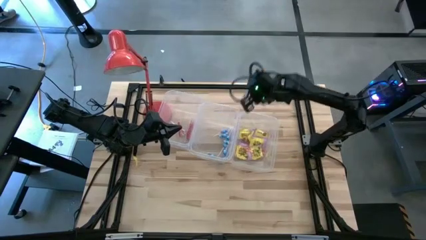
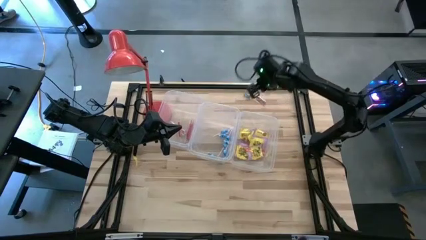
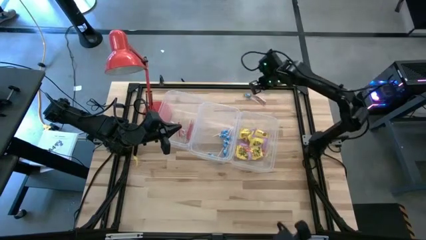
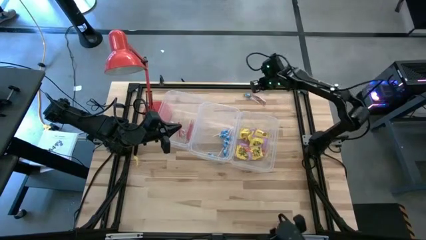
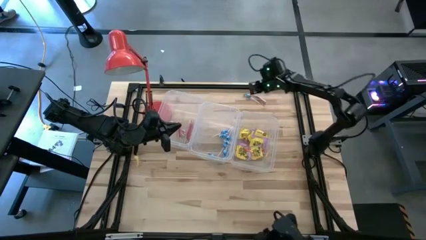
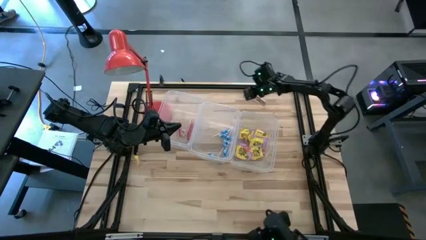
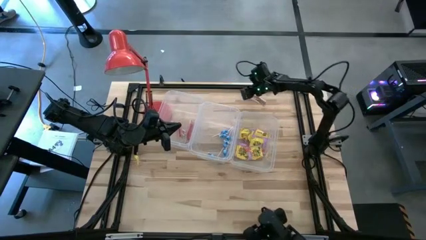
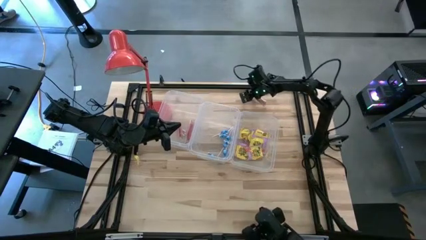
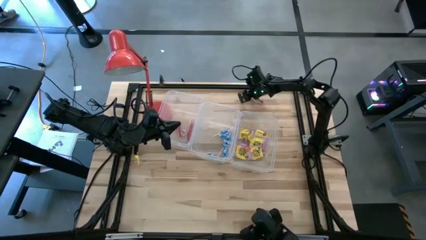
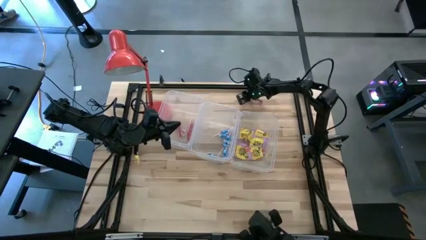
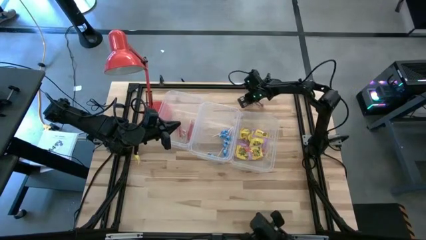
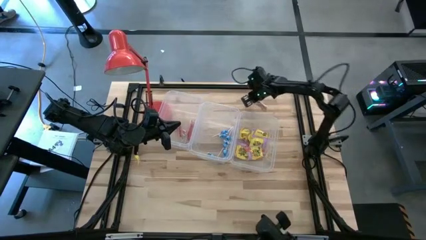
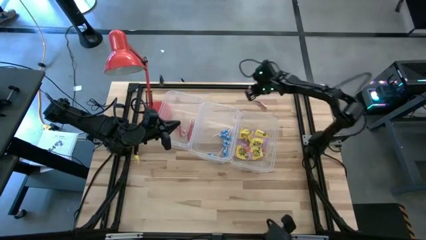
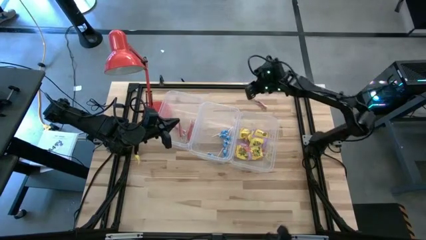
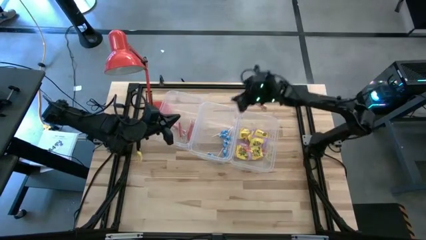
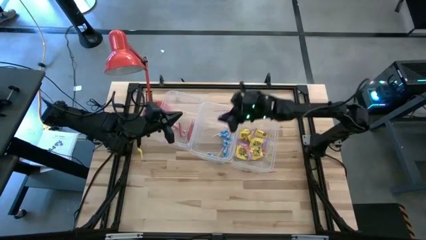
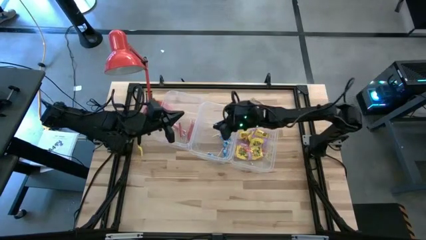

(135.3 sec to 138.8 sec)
Task: Sort candy
Put the blue candy into the center transparent bin

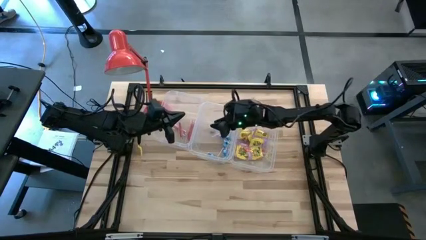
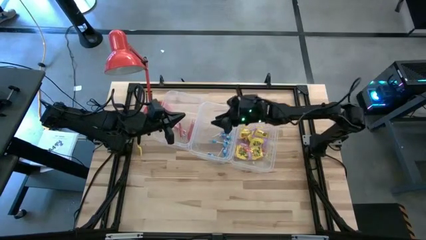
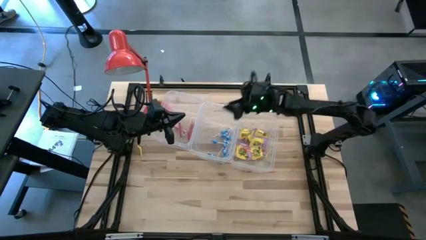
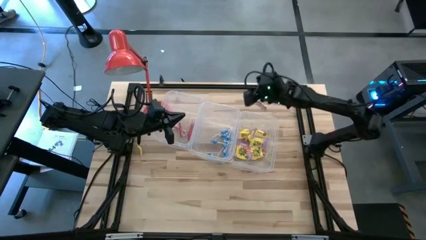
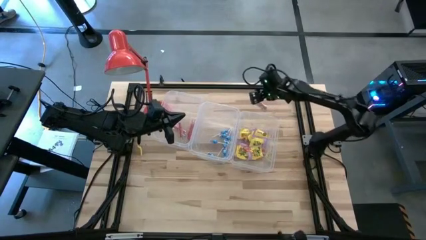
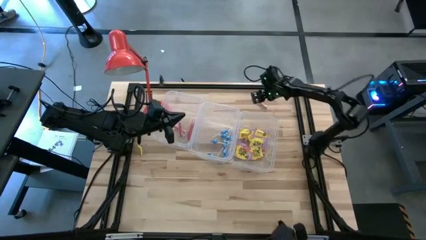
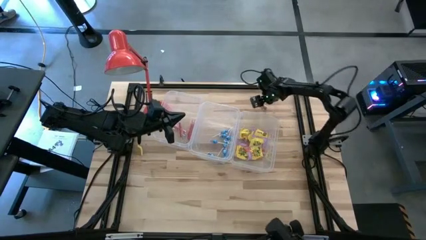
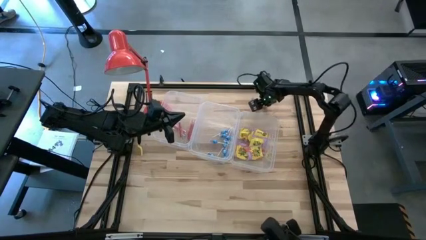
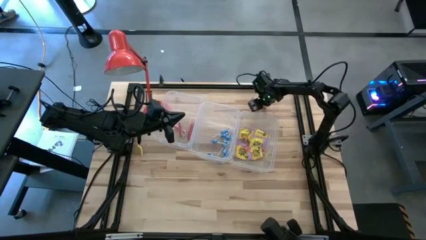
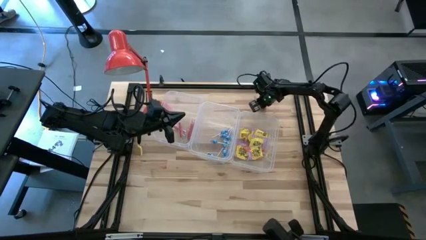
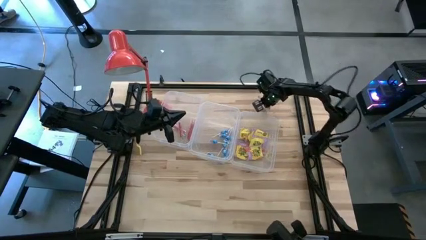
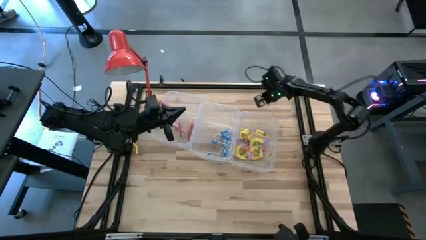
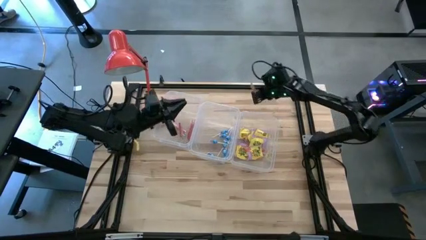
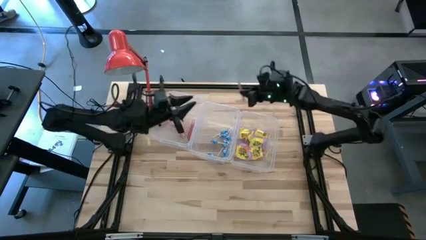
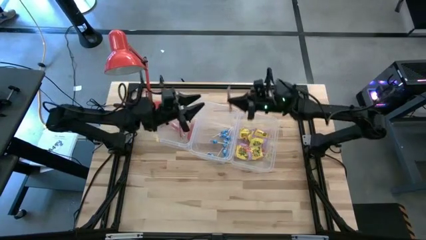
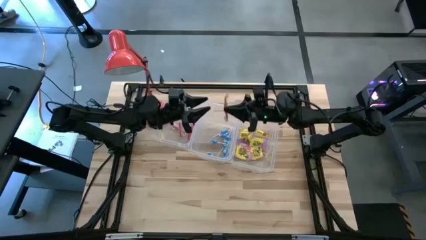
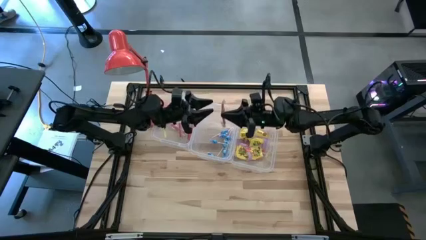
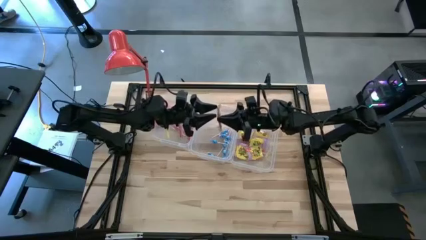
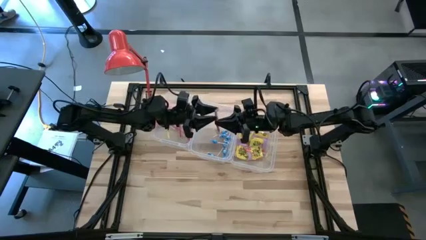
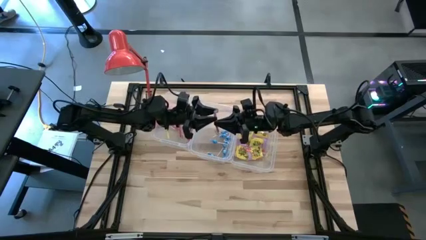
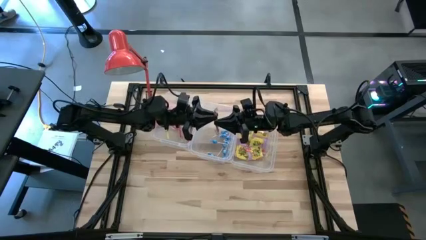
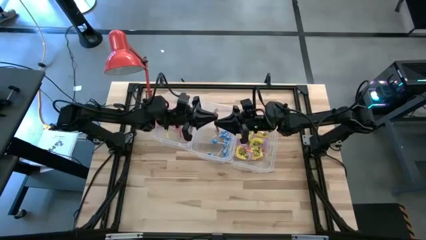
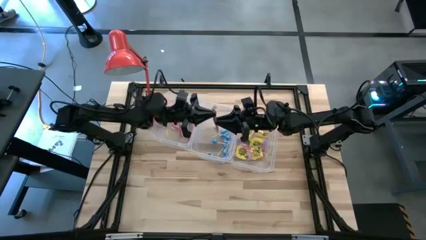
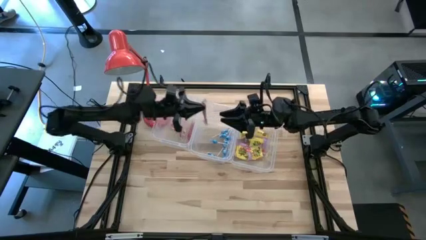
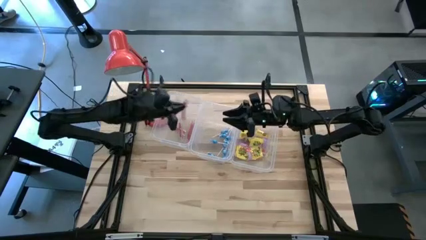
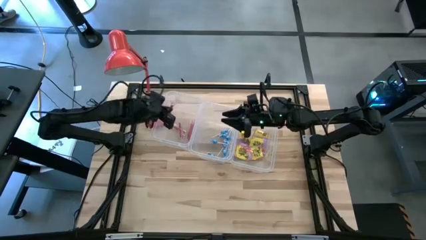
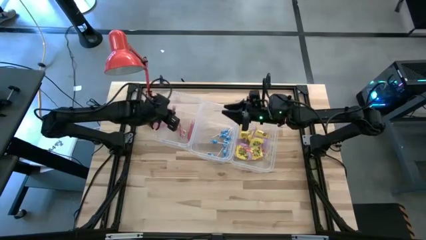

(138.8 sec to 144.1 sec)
Put the red candy into the left transparent bin

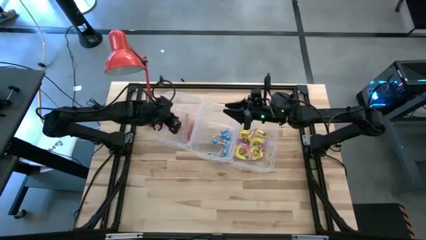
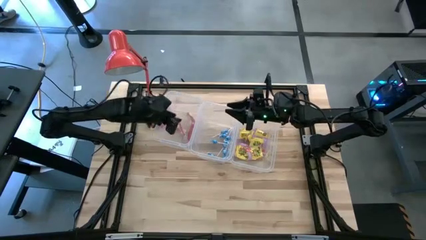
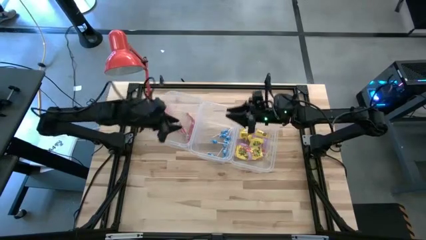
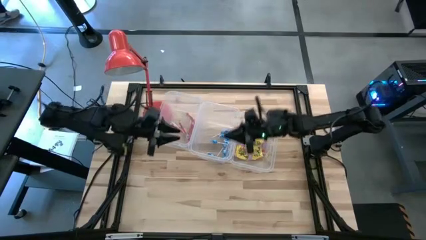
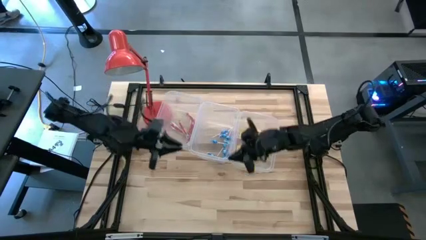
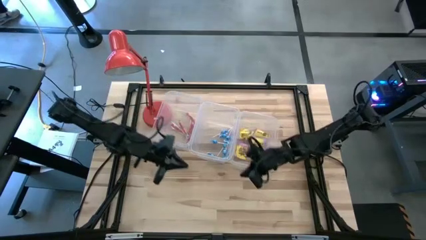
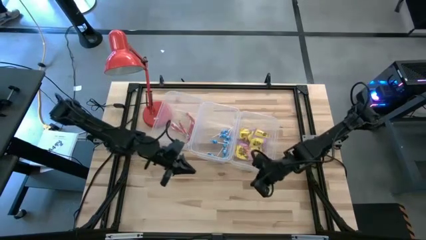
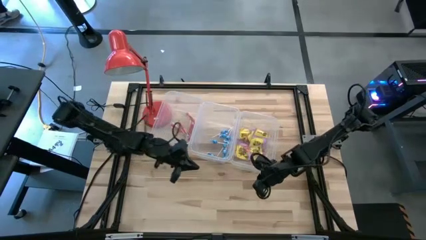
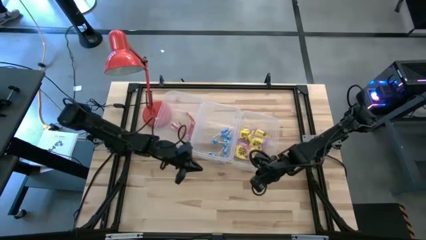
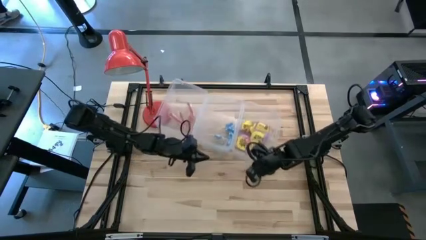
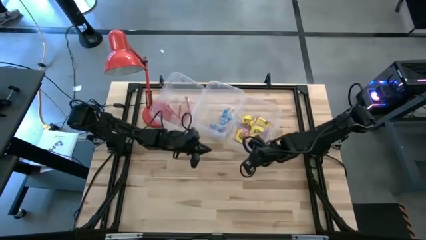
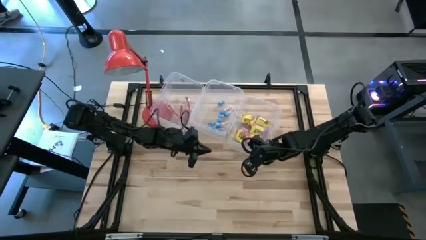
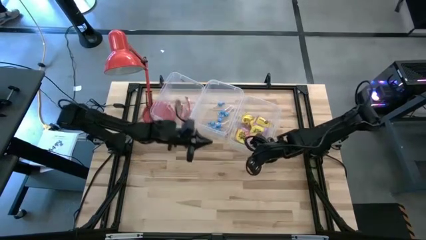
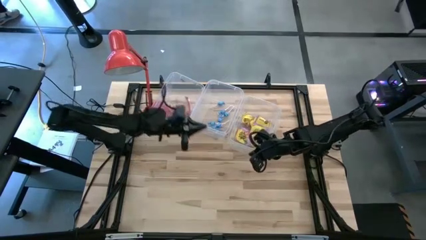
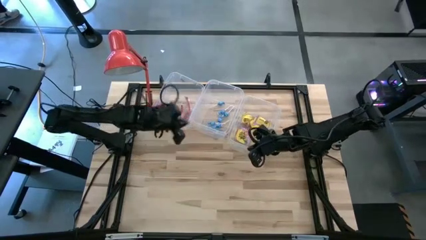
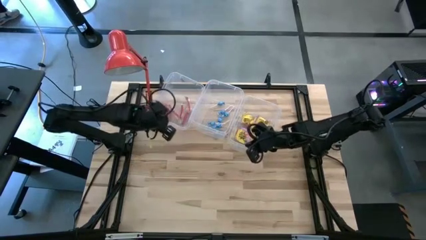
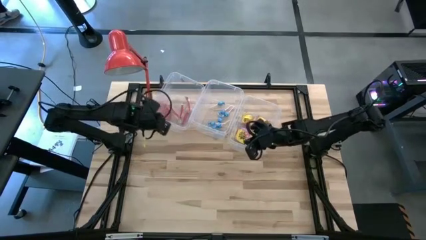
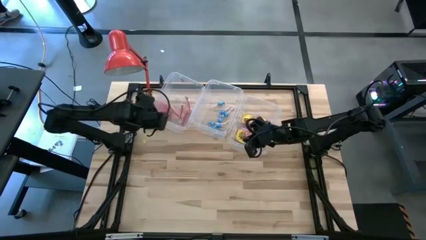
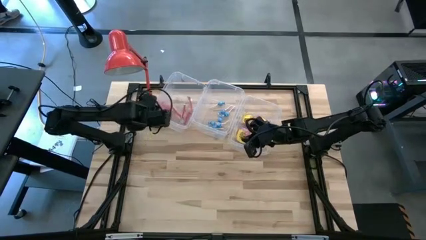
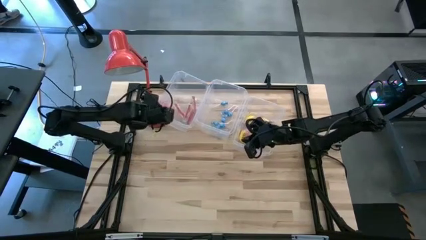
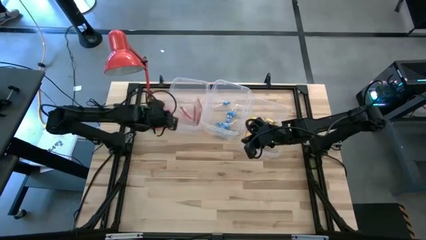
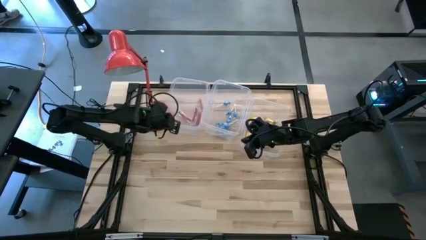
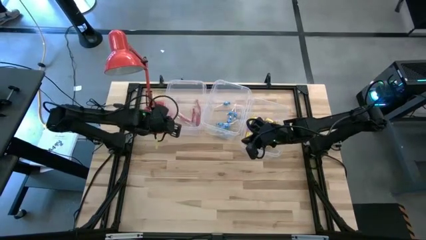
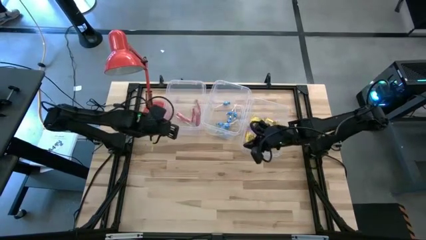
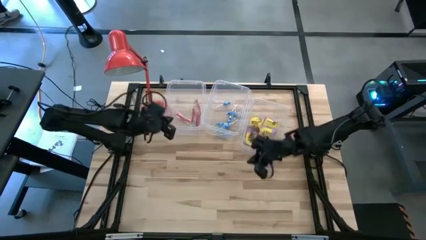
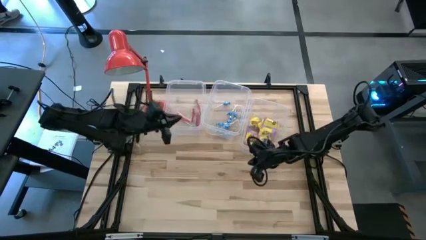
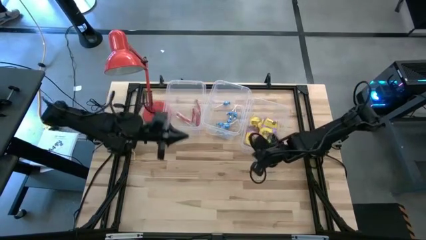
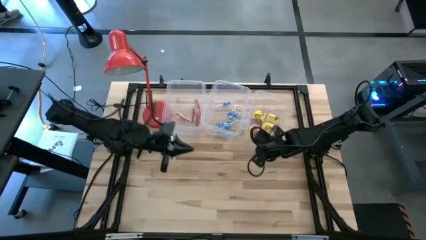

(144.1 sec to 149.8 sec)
Move the transparent bins to the top of the table
